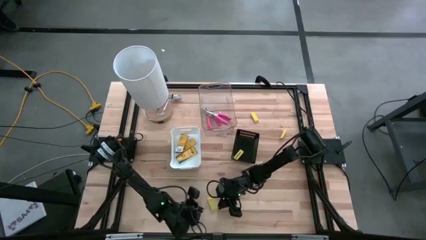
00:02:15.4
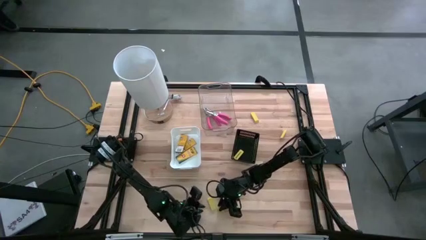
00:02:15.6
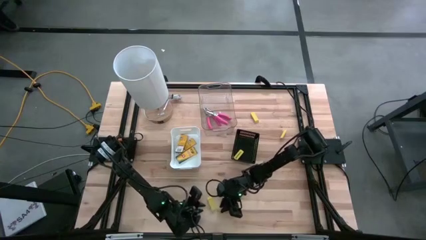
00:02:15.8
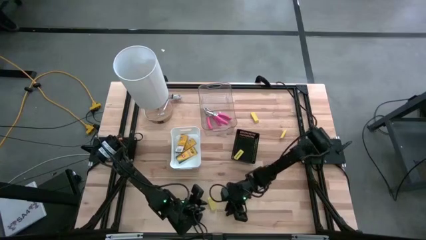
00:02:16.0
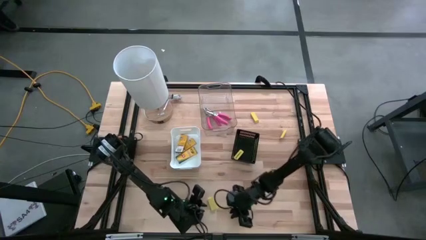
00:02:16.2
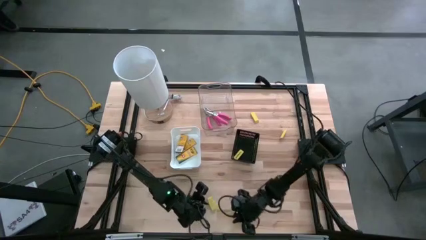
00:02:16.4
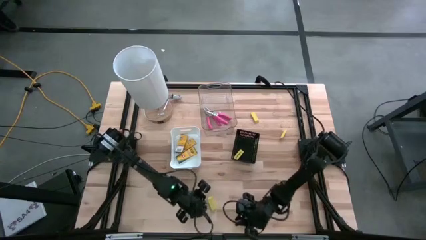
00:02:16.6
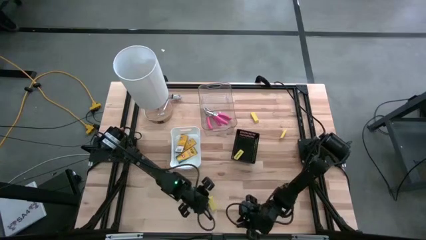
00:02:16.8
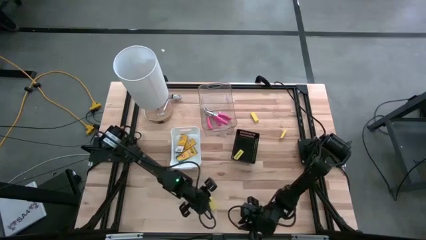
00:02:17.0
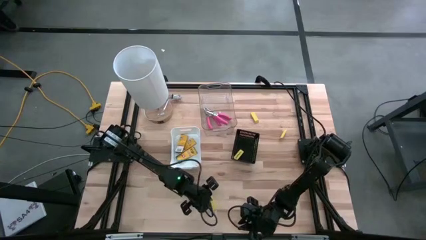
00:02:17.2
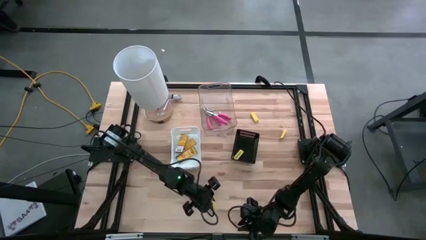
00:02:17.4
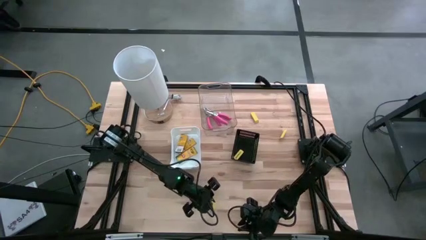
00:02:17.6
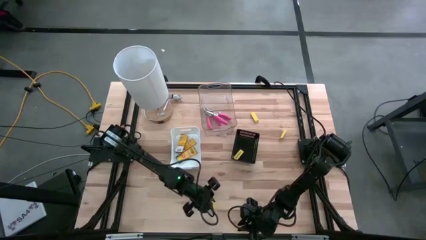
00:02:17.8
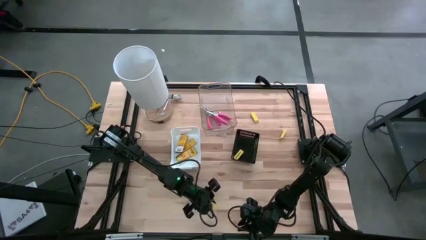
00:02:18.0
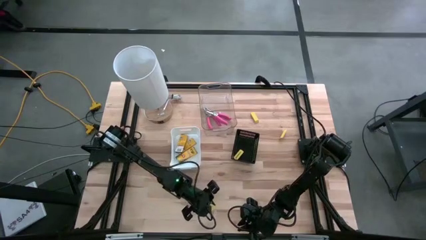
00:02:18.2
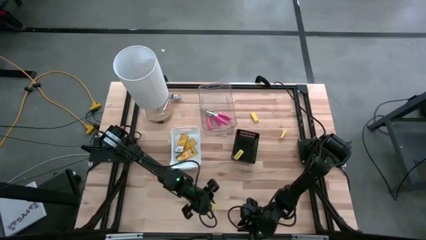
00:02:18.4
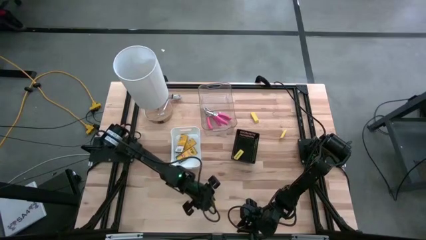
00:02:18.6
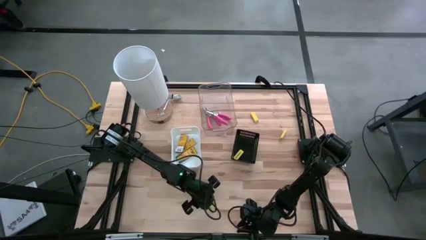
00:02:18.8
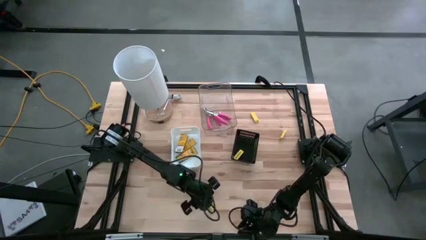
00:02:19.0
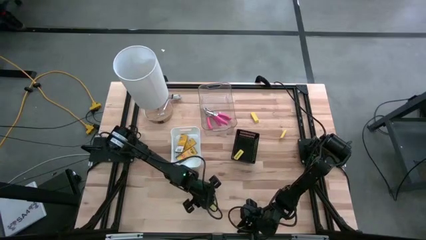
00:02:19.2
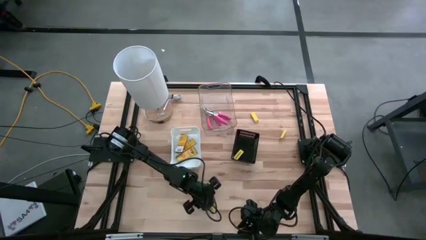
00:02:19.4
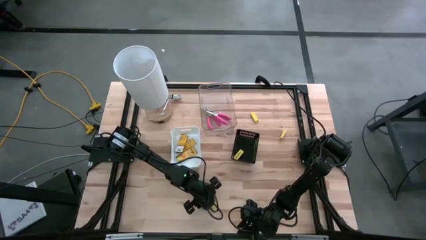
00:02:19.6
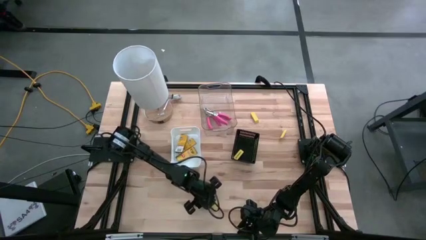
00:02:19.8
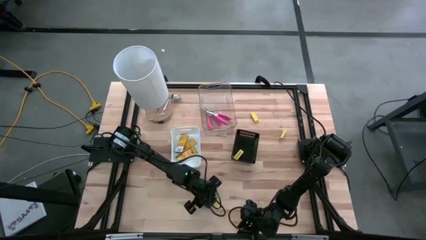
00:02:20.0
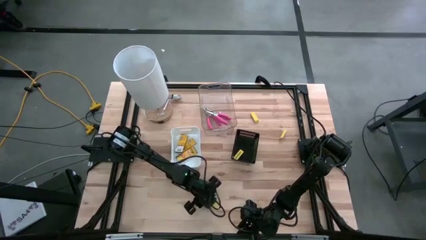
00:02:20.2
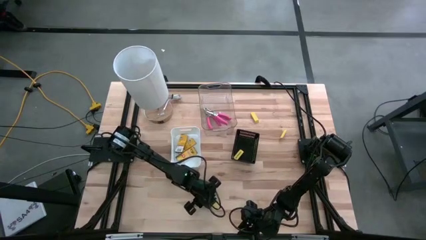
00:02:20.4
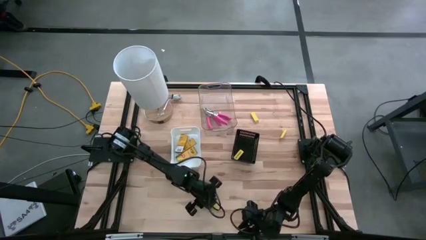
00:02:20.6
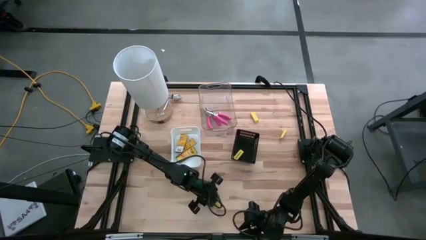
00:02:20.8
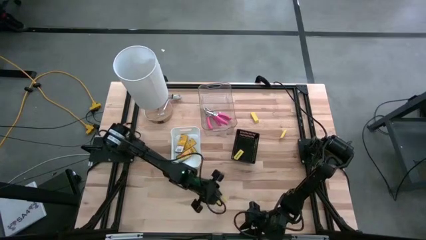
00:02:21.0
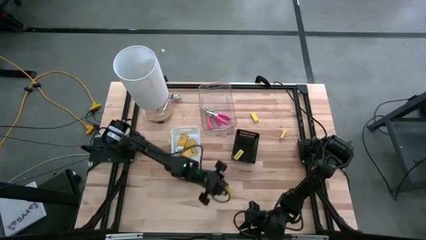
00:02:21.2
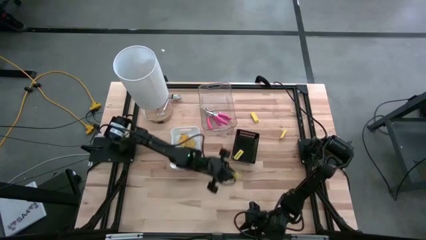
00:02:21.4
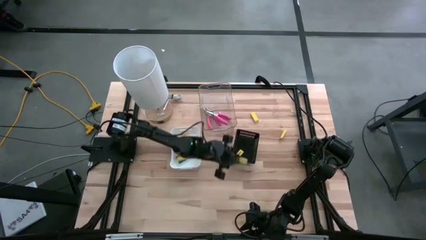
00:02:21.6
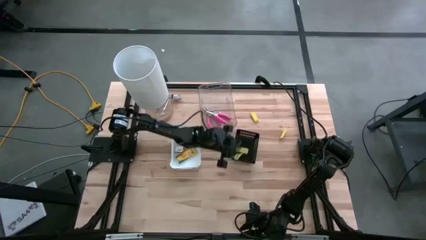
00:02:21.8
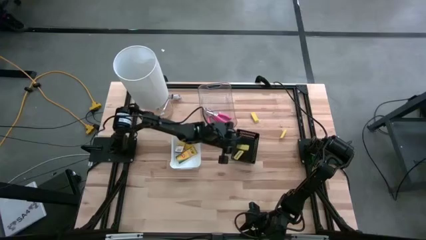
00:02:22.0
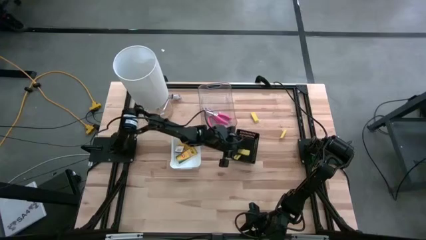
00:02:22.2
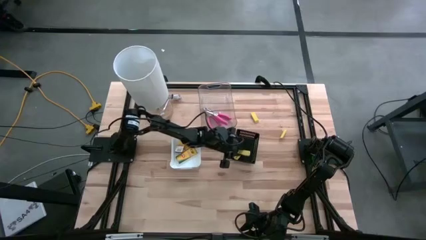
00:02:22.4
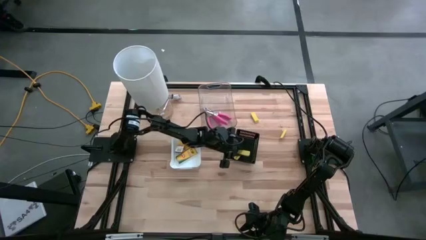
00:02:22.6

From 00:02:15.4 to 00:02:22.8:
Task: Pick & Place School Supplies
Put the bottom left yellow eraser into the black bin

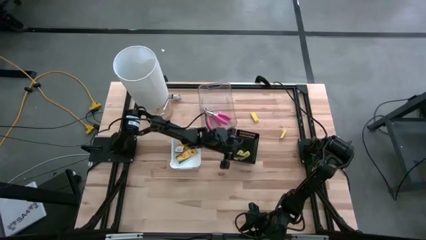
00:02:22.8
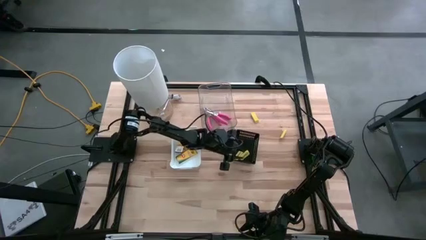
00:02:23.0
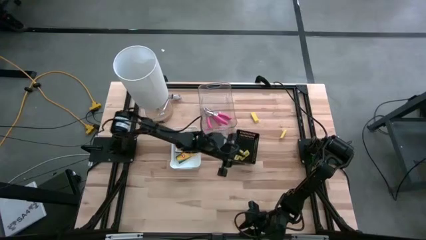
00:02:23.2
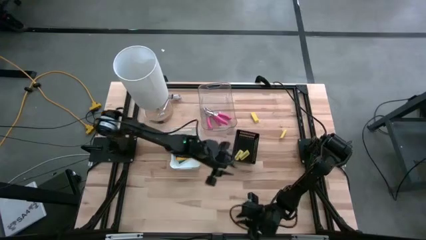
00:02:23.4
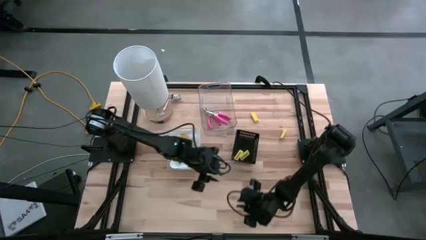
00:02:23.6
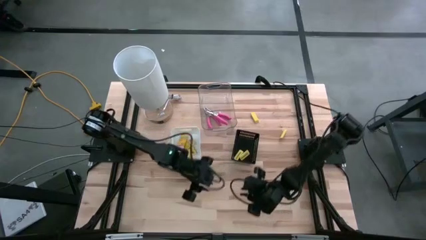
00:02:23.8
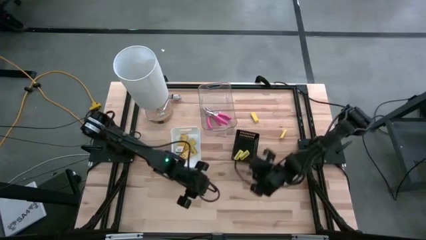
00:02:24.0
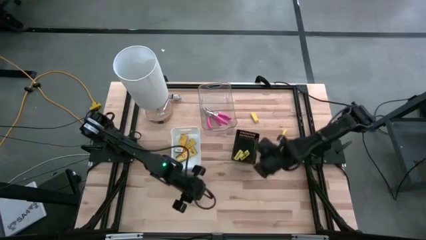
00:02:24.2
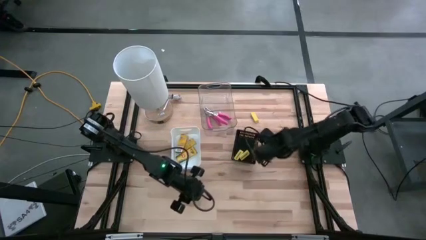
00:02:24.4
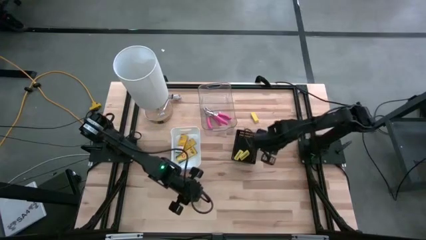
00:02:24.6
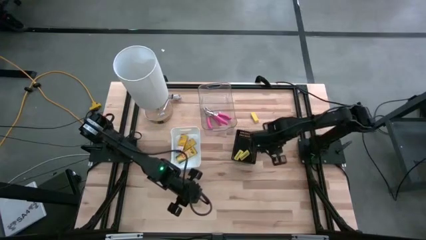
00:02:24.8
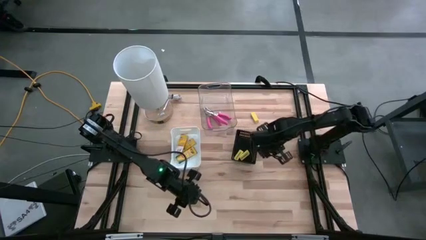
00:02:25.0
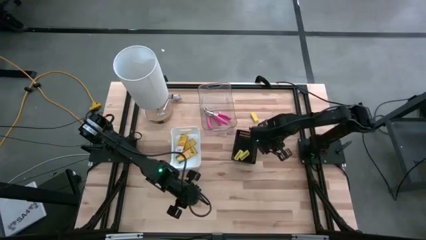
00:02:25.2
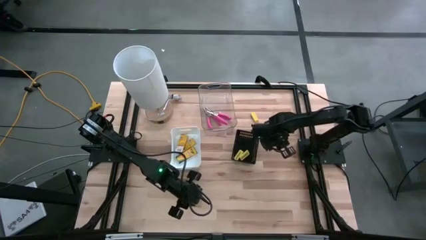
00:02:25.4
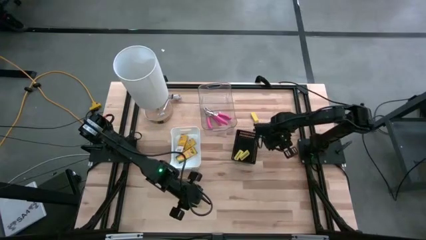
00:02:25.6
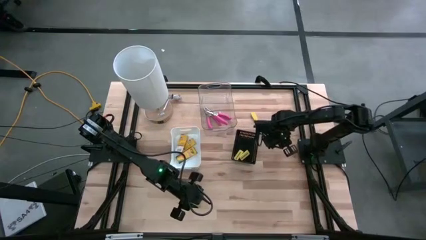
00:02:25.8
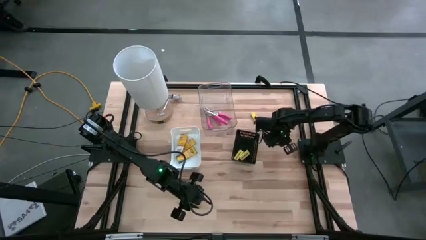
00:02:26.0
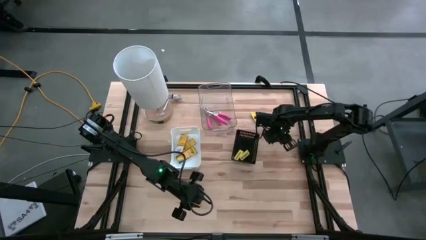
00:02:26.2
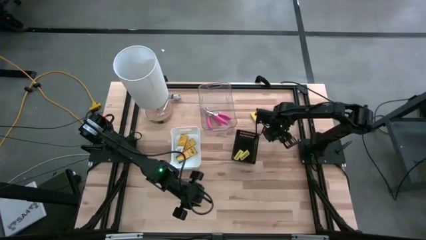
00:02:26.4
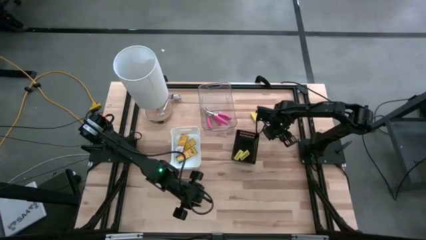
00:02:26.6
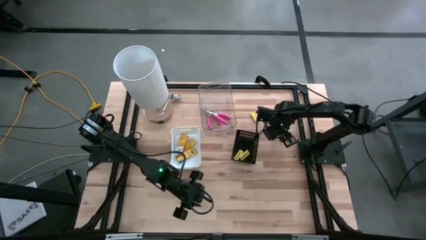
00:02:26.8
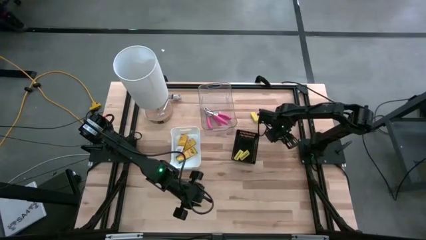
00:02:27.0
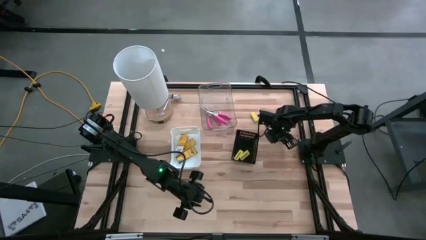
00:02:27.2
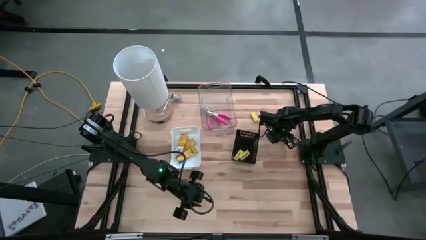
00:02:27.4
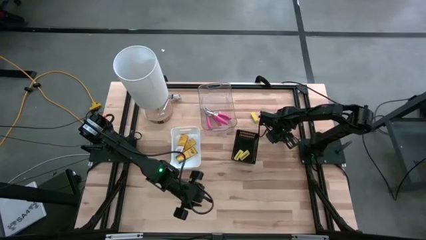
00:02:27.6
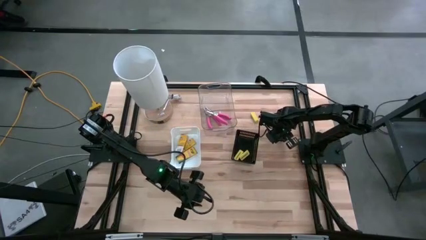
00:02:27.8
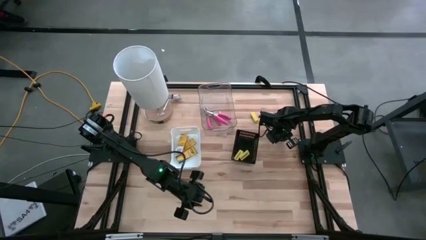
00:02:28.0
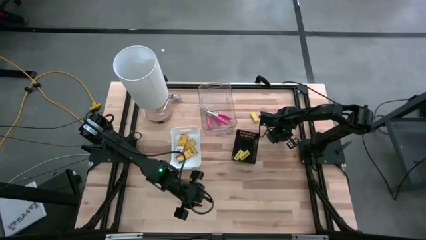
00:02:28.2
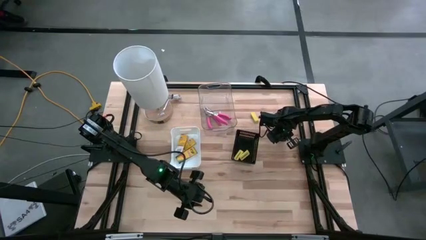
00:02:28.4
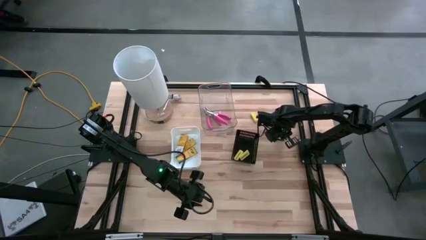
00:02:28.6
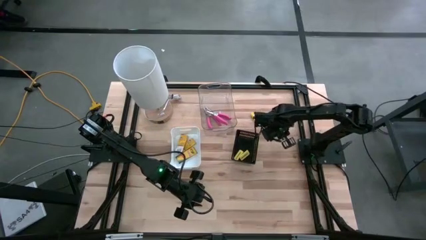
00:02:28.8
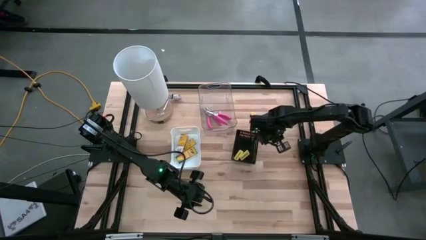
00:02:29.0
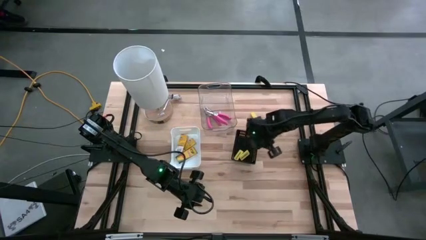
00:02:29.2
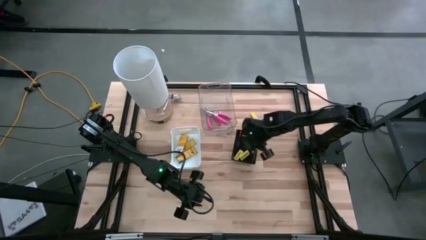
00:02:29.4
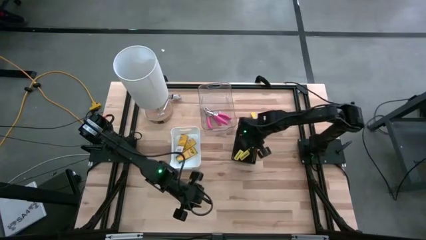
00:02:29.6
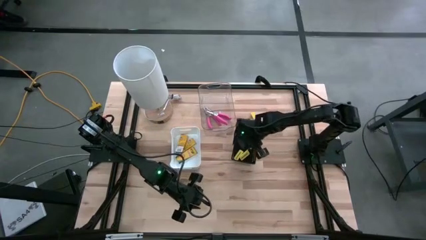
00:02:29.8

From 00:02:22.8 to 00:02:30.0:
Put the right yellow eraser into the black bin
